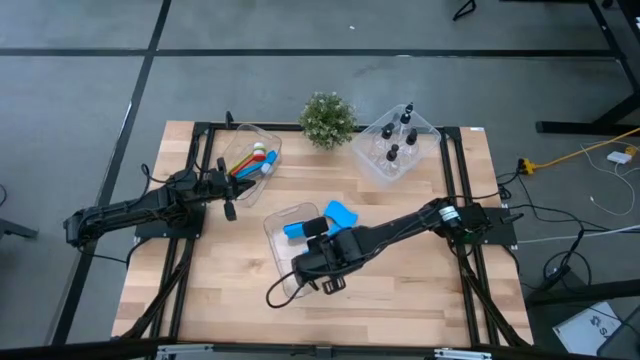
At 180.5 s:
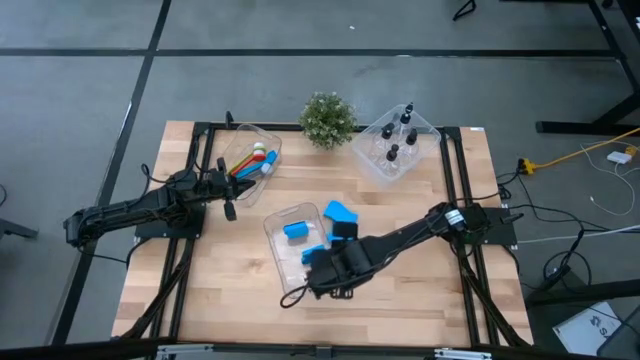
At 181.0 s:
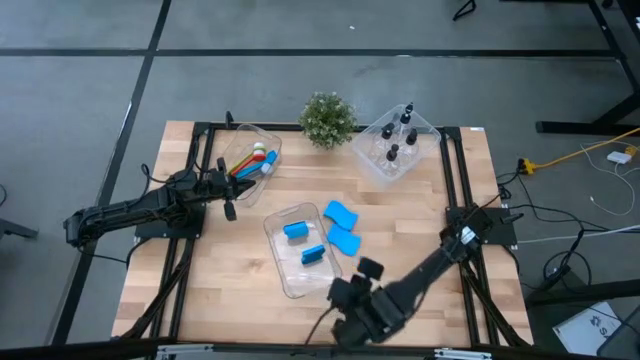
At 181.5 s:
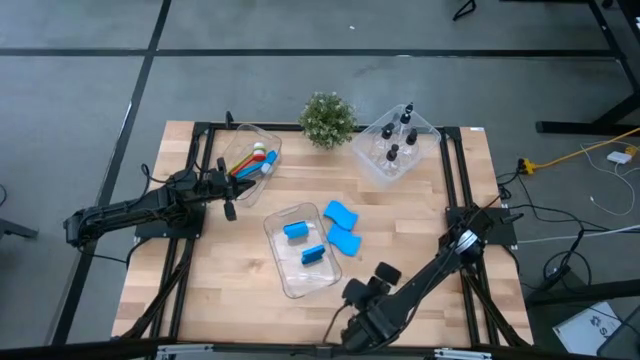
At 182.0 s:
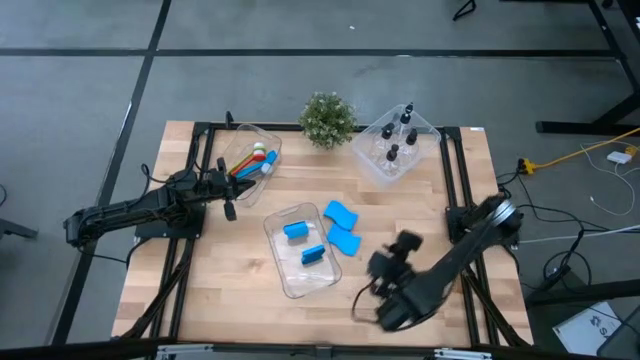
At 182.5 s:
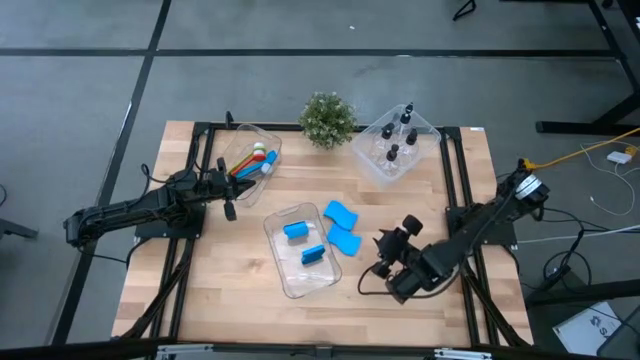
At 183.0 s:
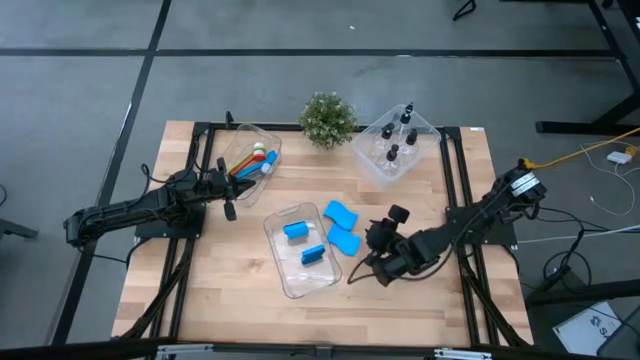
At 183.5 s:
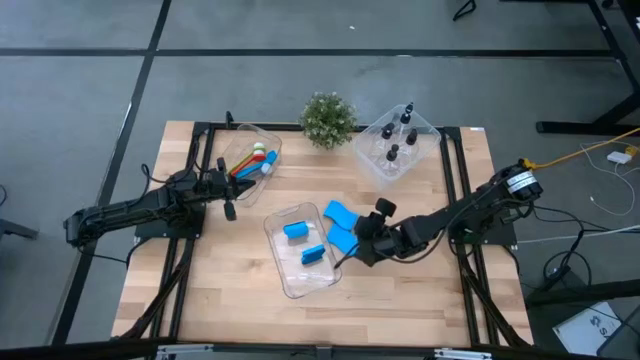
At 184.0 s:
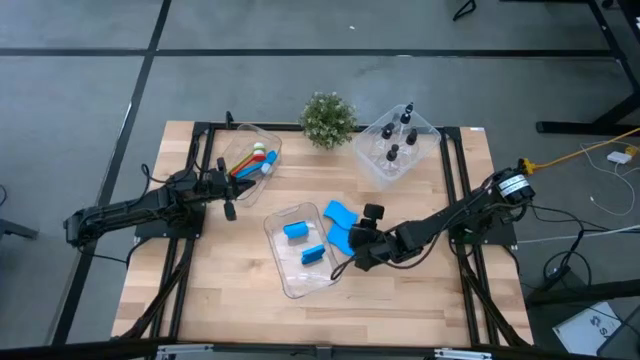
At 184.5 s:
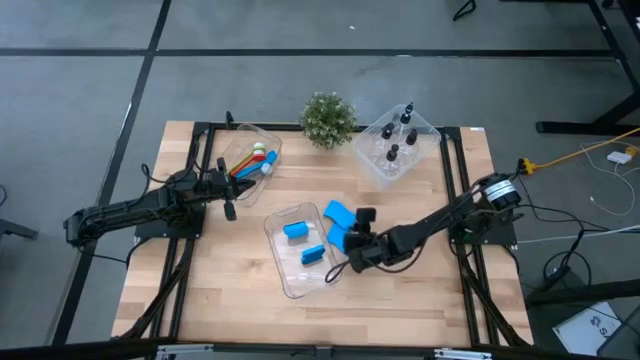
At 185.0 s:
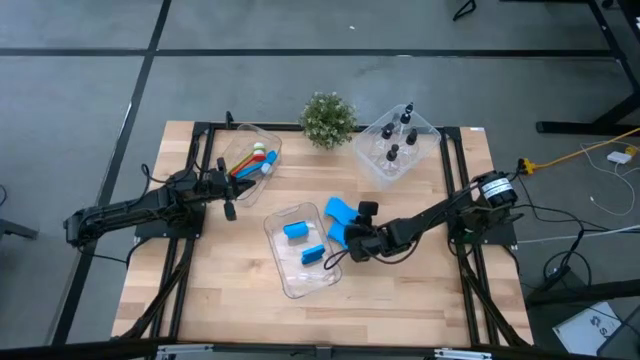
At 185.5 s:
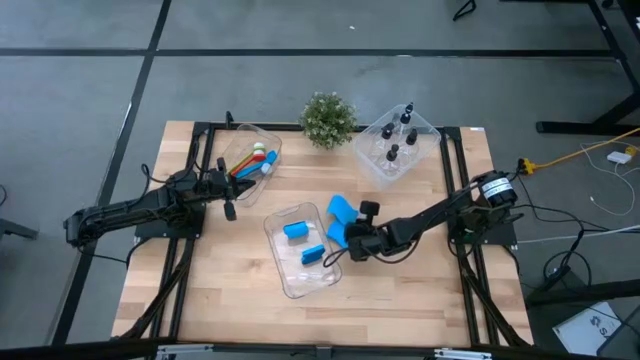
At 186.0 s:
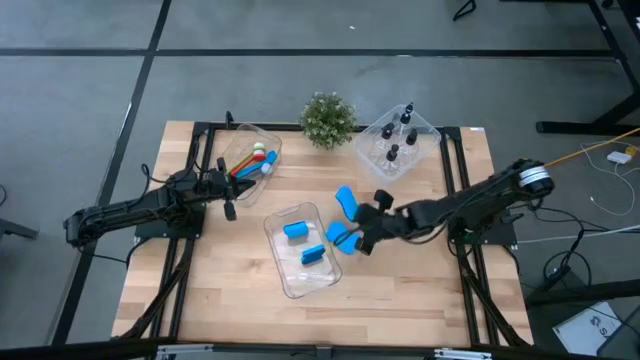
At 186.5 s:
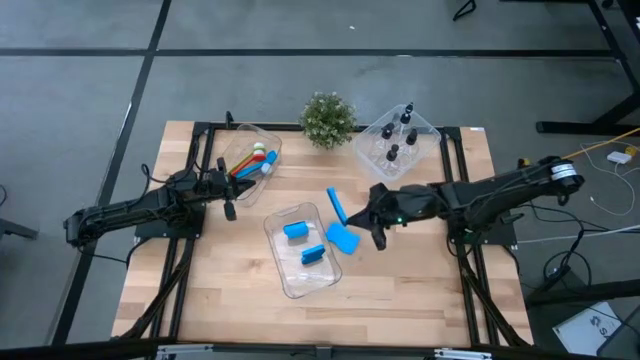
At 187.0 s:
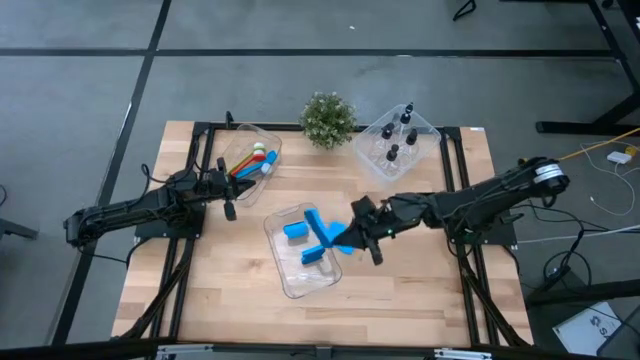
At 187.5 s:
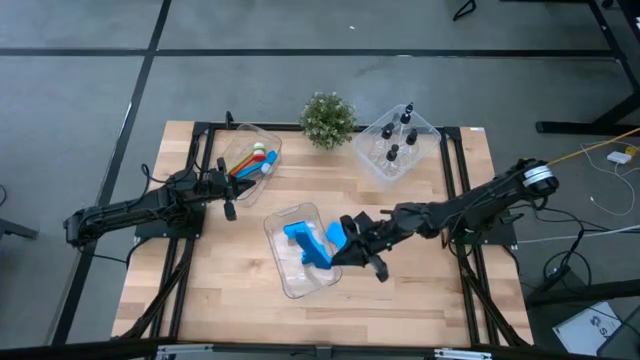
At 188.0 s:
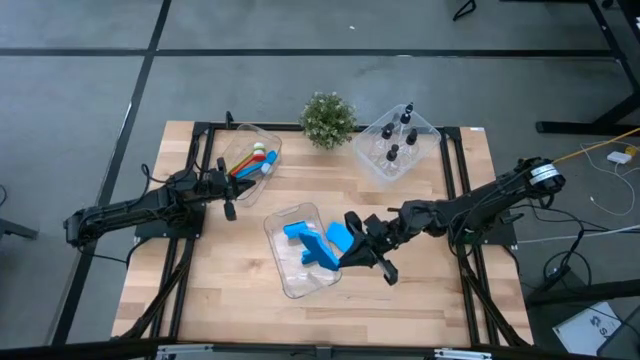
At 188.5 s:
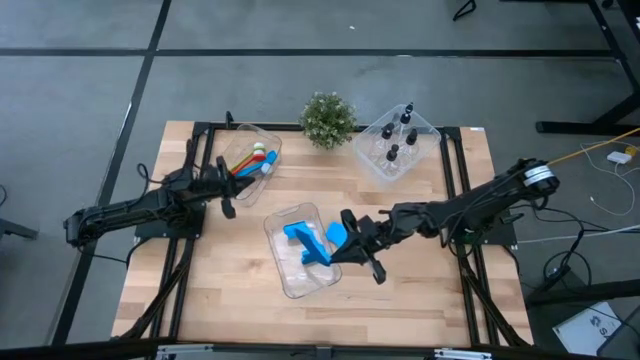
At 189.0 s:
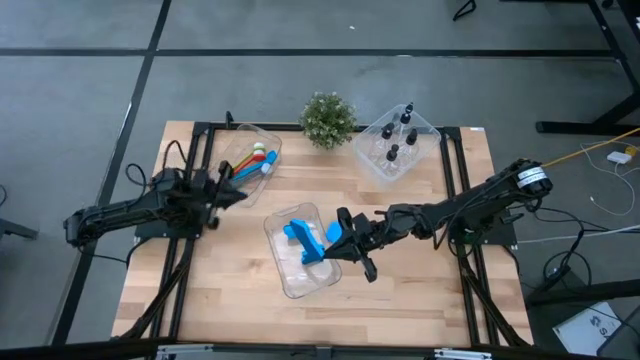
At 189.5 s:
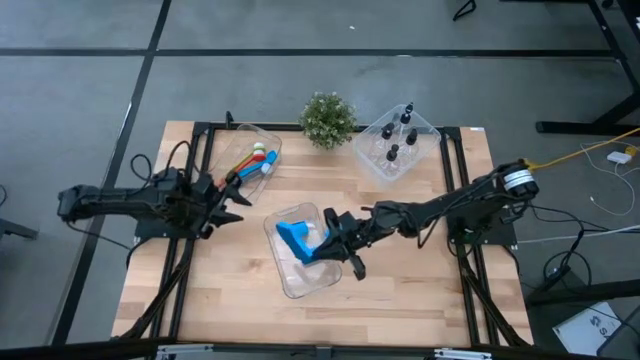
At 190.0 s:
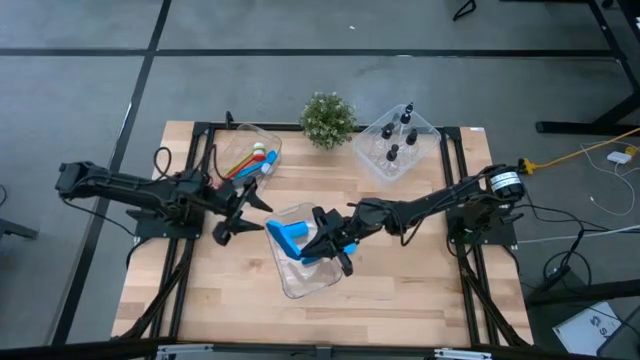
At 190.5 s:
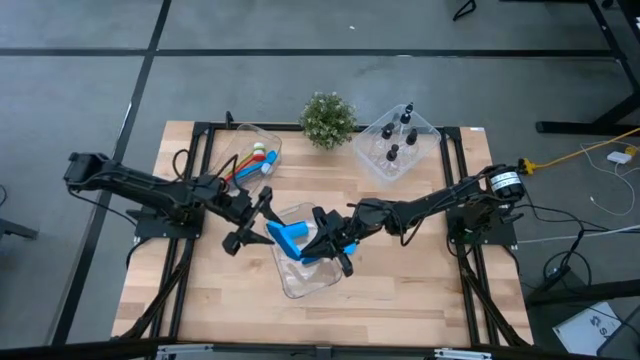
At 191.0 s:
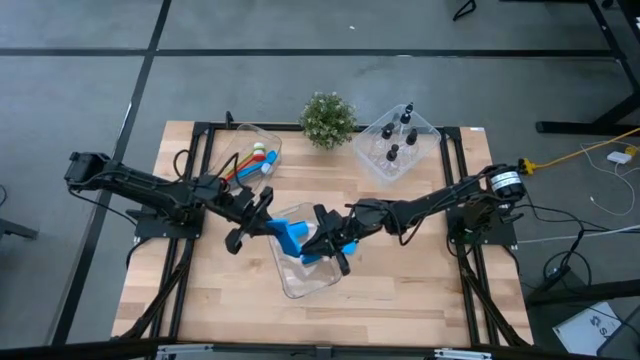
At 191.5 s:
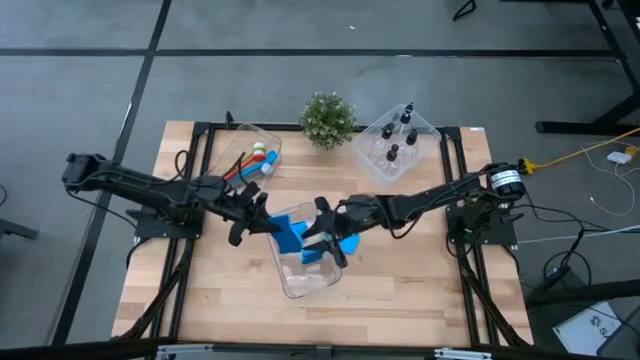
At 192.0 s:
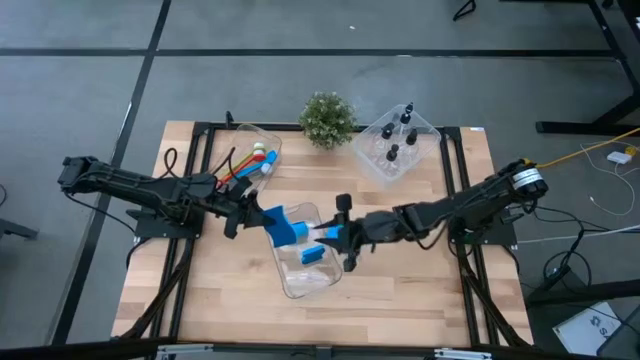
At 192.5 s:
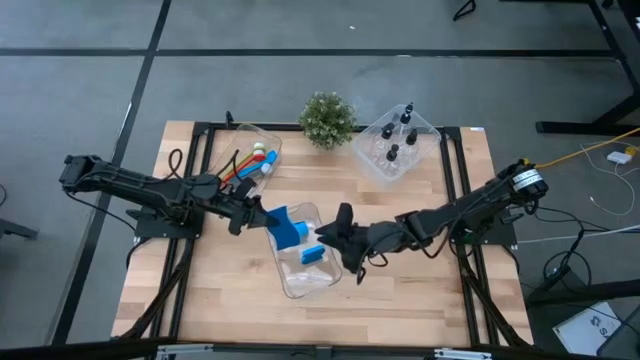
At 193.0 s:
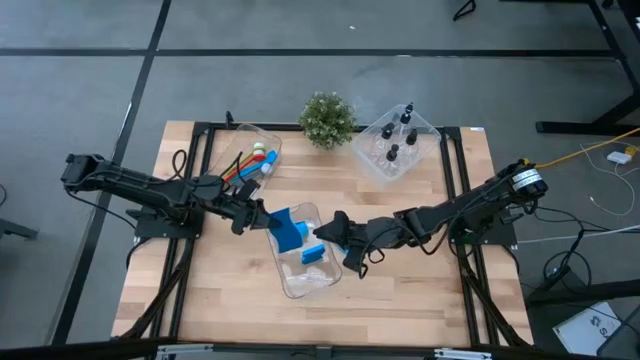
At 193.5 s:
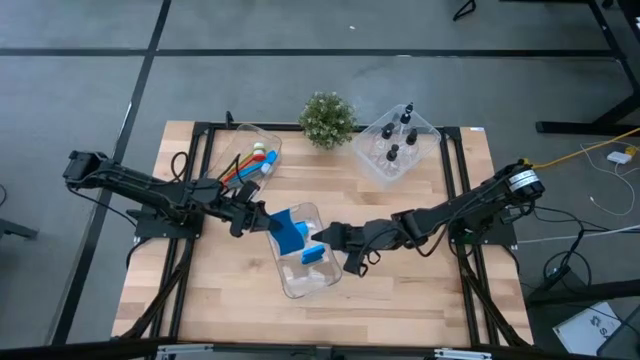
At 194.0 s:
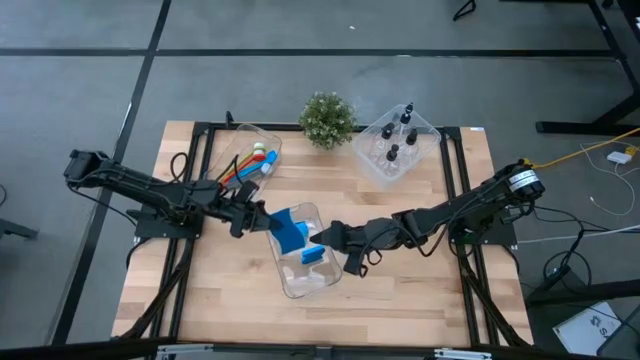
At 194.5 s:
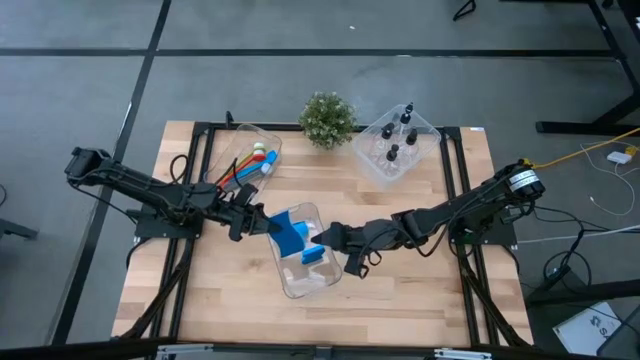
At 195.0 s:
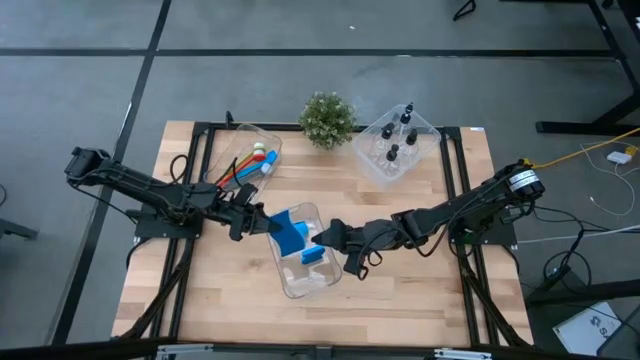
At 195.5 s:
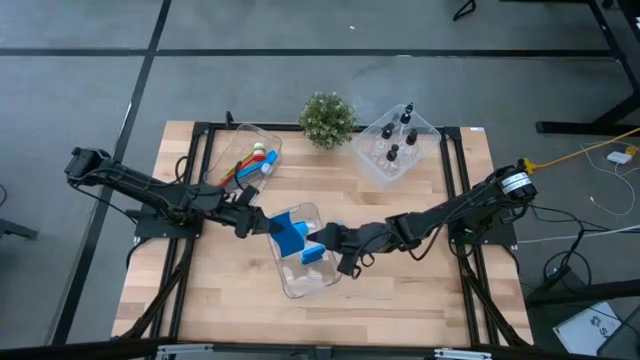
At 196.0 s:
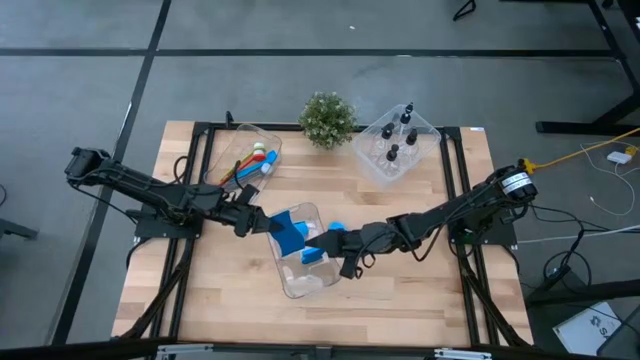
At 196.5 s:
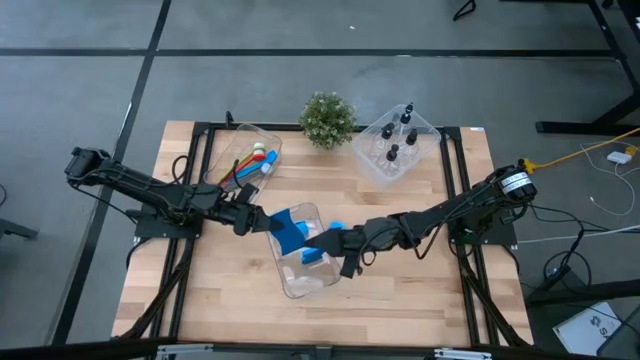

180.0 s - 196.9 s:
Task: Pick & Place Kitchen Sink Supplies
Put the sponge into the bottom transparent bin

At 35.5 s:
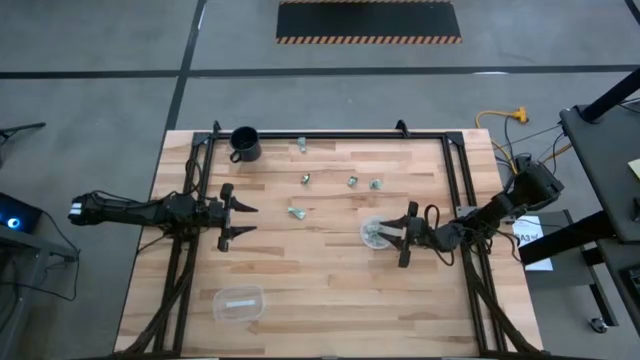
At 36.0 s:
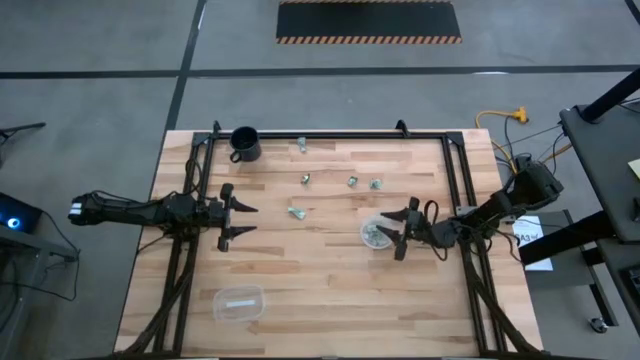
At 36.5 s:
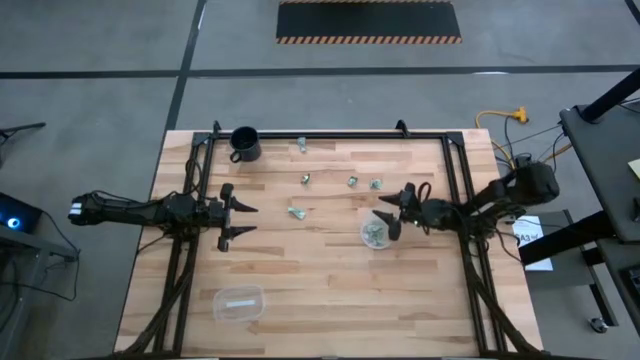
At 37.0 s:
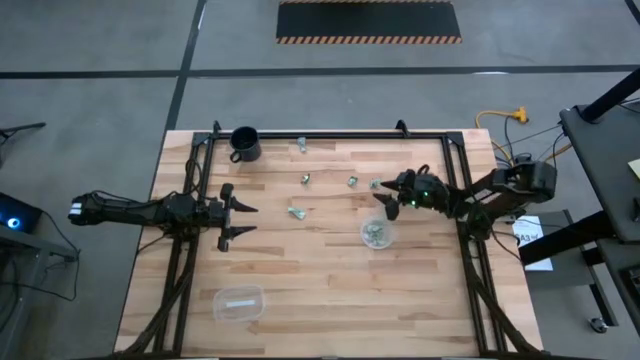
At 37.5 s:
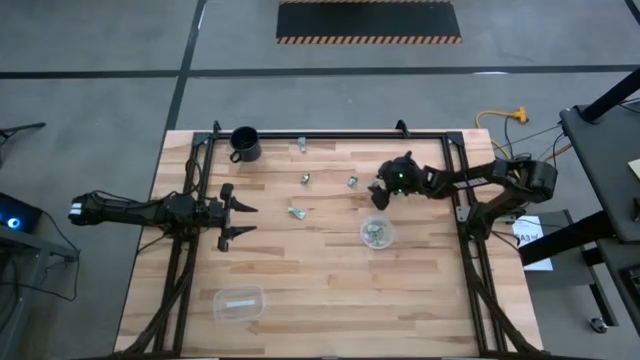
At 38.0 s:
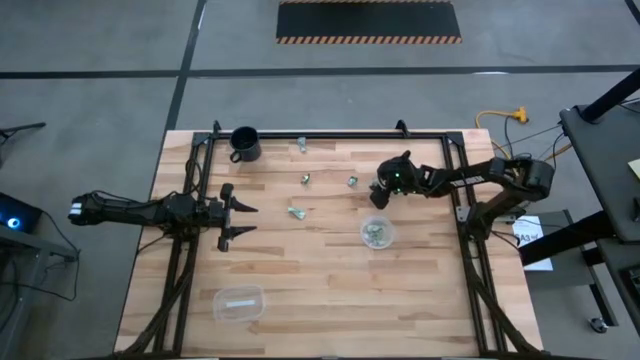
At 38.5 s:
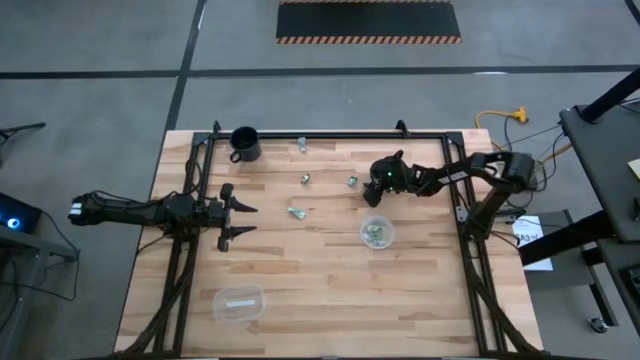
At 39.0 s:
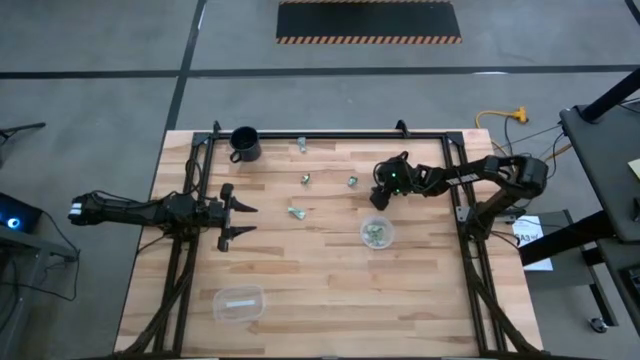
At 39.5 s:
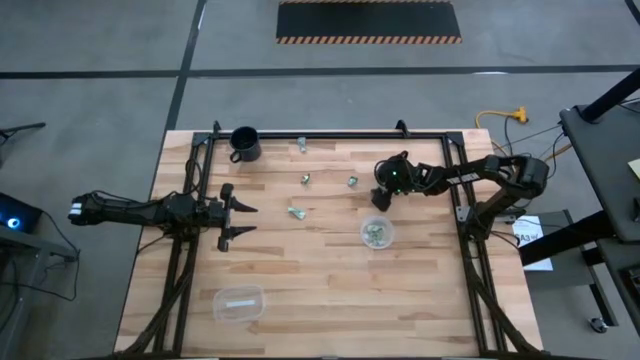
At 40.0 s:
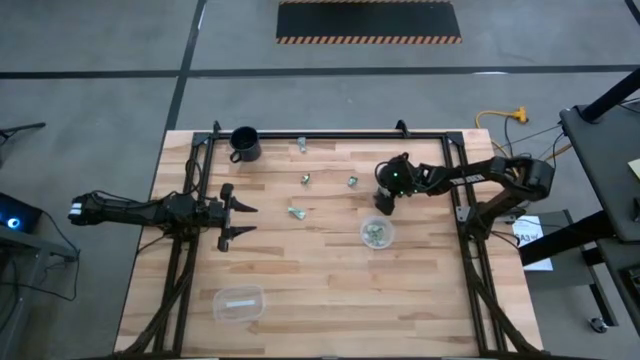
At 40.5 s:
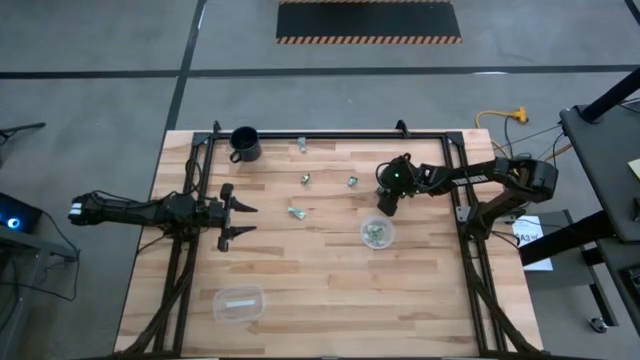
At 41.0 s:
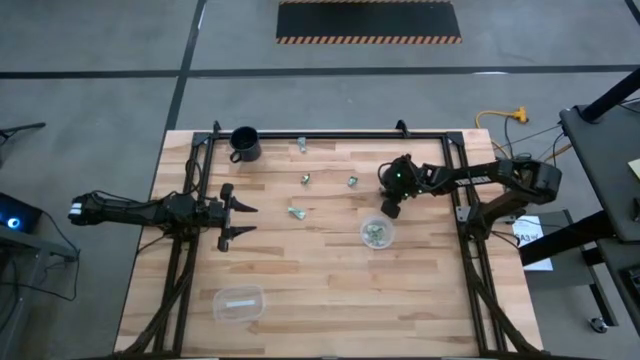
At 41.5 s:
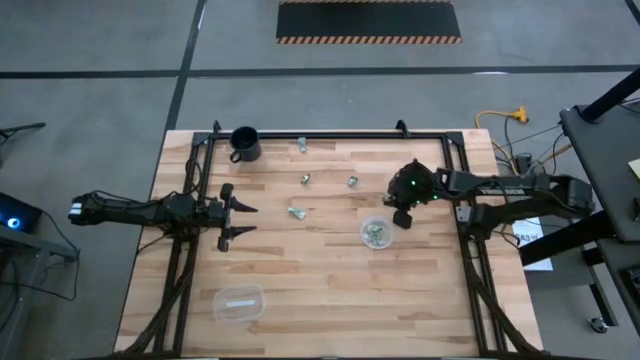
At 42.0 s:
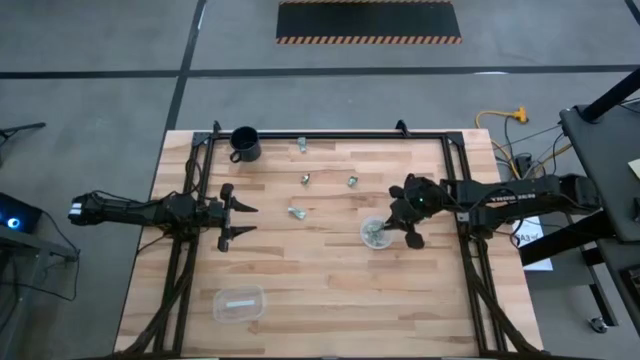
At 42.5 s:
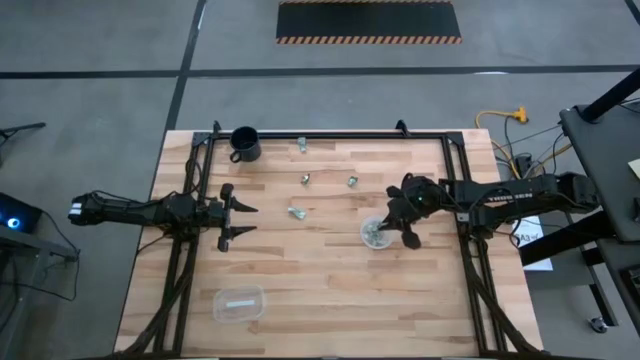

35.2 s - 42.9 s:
Task: Pick and place Stevia / Truvia into bins
Put the white stevia packet into the right transparent container
